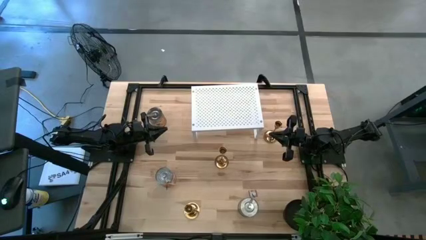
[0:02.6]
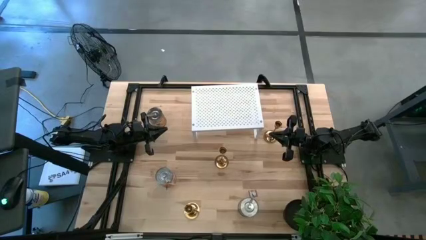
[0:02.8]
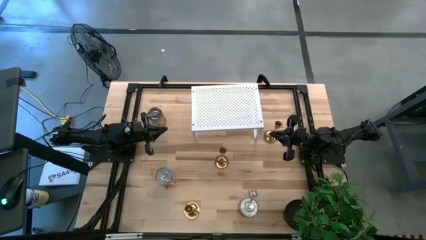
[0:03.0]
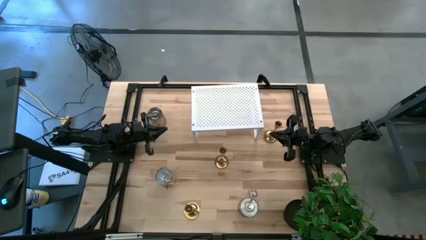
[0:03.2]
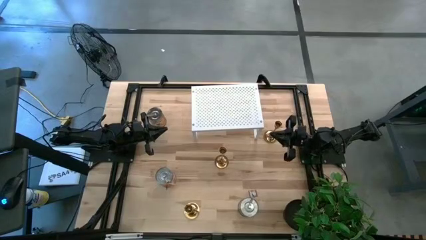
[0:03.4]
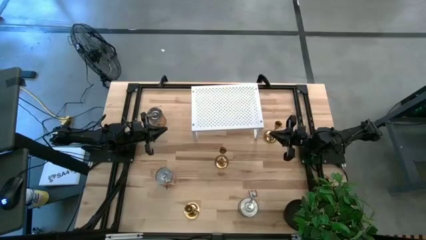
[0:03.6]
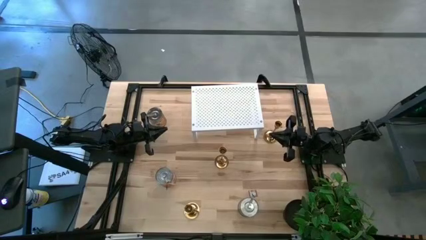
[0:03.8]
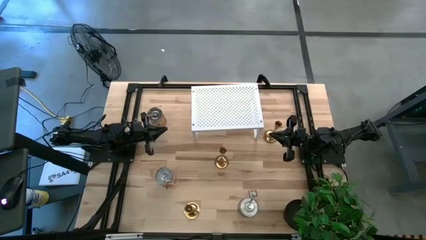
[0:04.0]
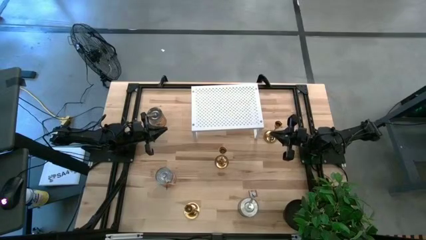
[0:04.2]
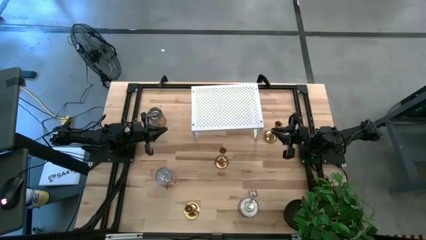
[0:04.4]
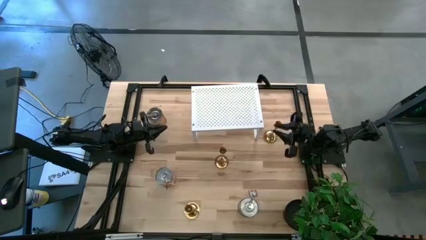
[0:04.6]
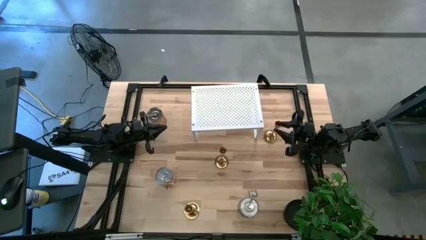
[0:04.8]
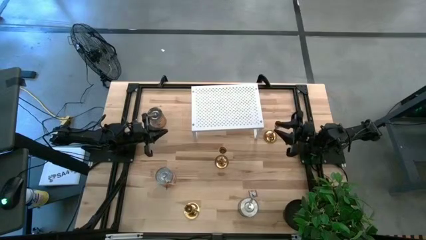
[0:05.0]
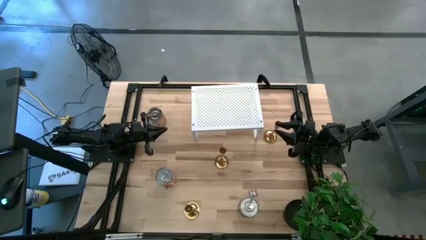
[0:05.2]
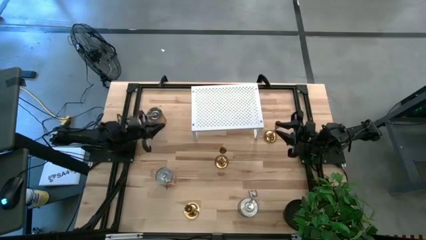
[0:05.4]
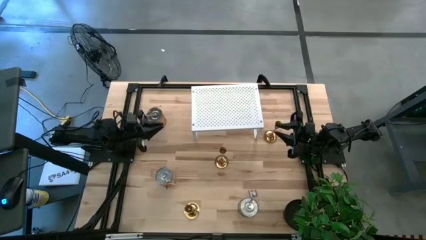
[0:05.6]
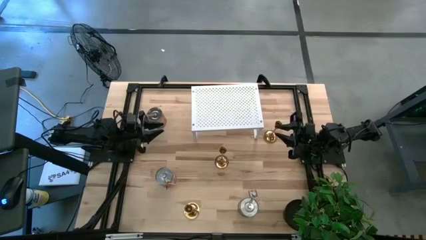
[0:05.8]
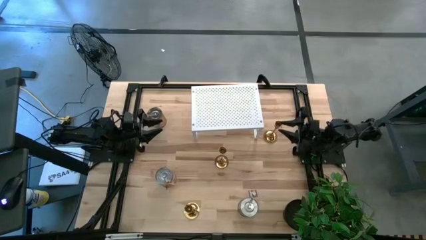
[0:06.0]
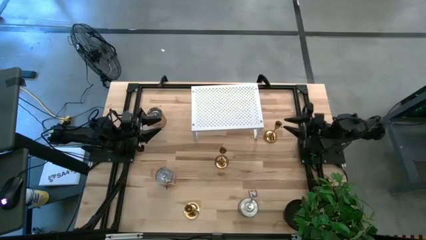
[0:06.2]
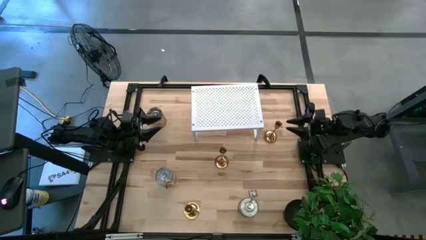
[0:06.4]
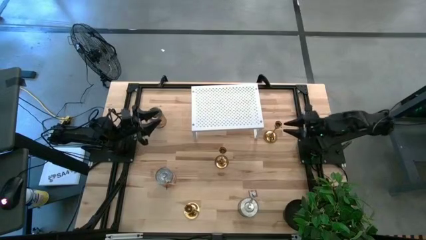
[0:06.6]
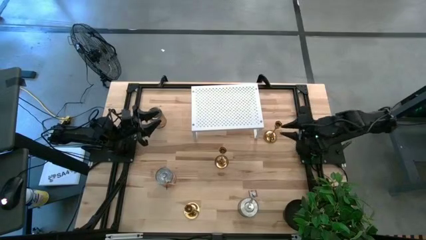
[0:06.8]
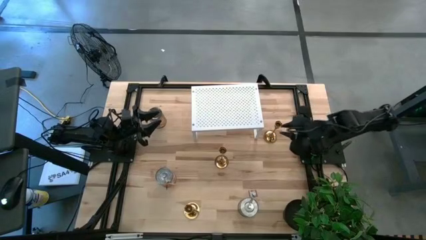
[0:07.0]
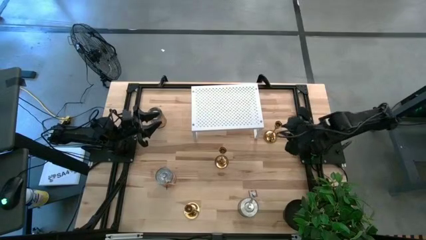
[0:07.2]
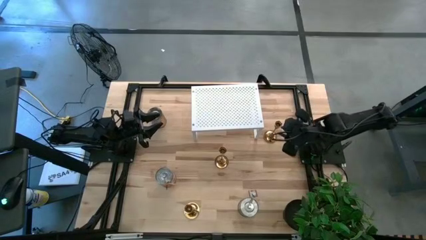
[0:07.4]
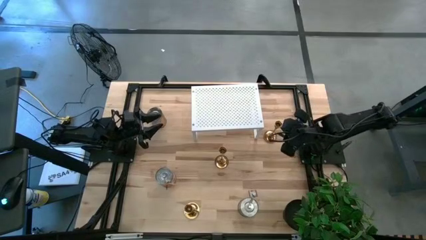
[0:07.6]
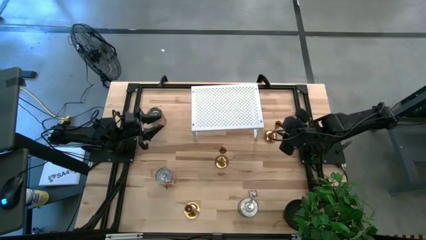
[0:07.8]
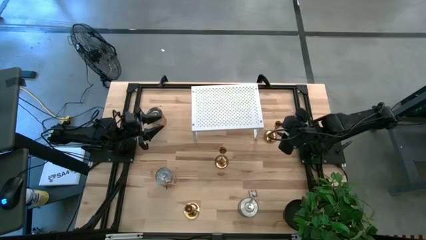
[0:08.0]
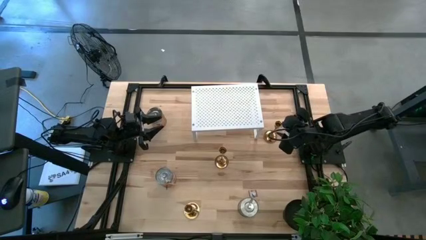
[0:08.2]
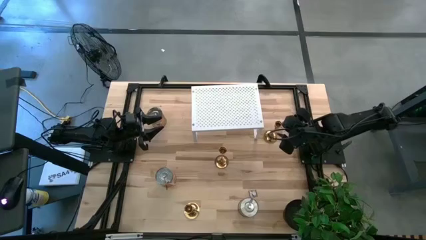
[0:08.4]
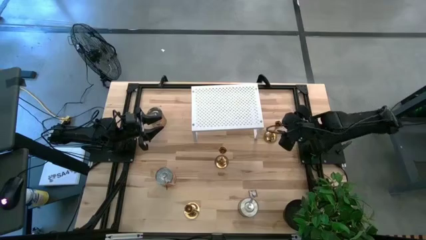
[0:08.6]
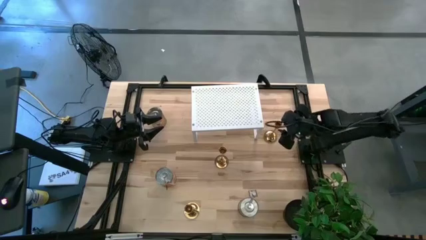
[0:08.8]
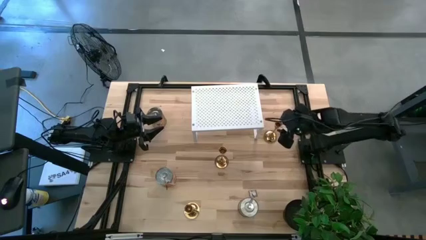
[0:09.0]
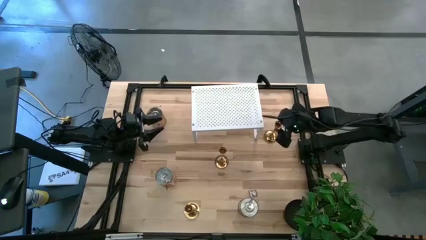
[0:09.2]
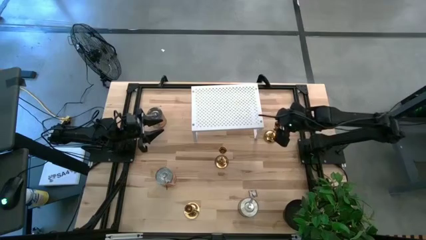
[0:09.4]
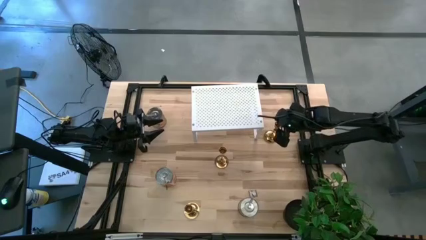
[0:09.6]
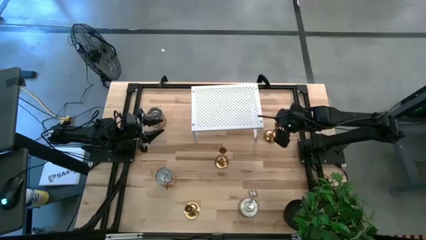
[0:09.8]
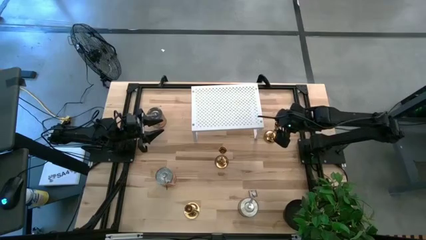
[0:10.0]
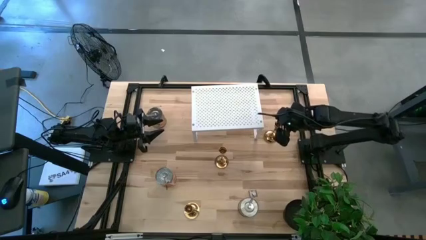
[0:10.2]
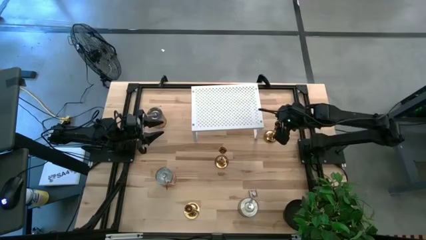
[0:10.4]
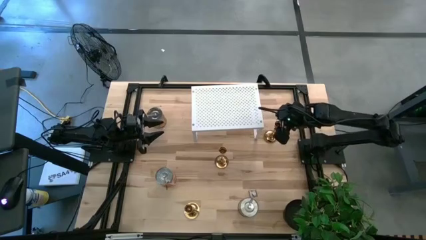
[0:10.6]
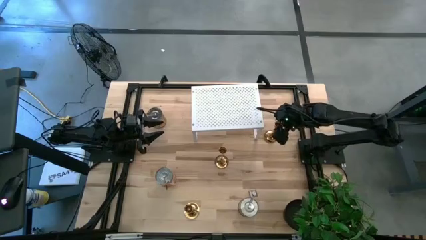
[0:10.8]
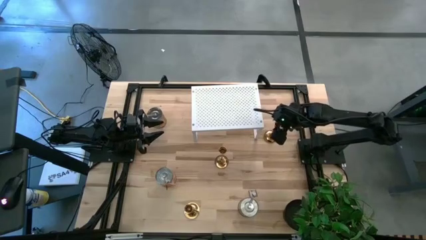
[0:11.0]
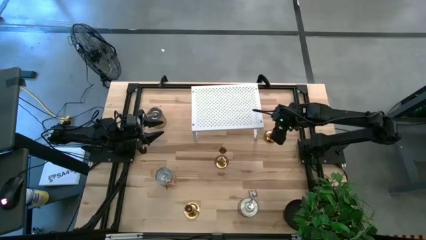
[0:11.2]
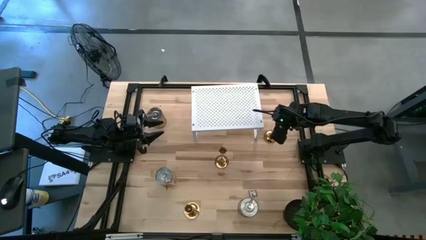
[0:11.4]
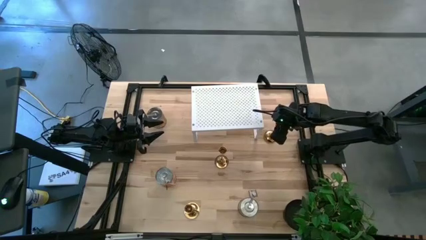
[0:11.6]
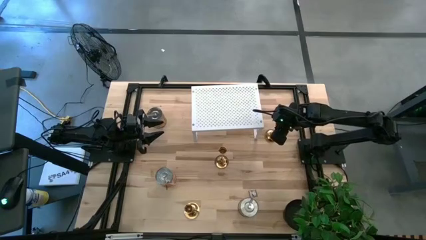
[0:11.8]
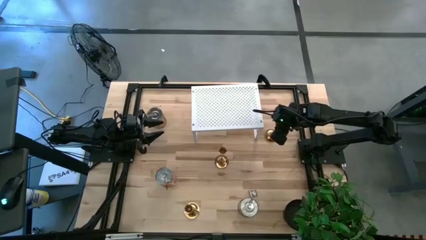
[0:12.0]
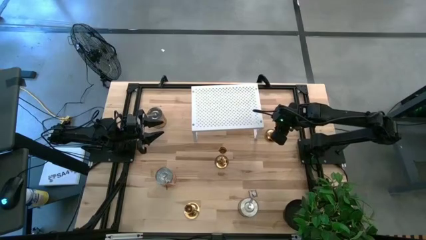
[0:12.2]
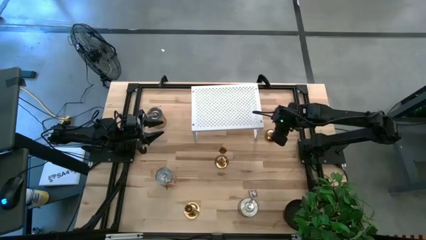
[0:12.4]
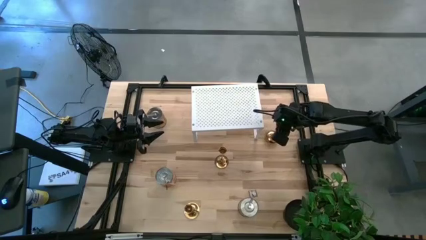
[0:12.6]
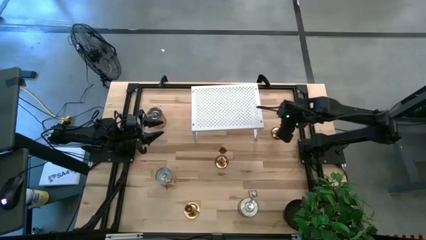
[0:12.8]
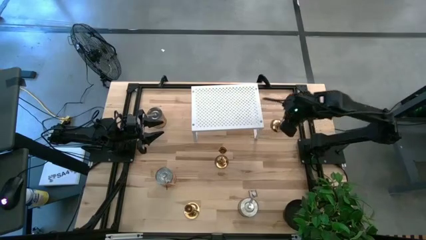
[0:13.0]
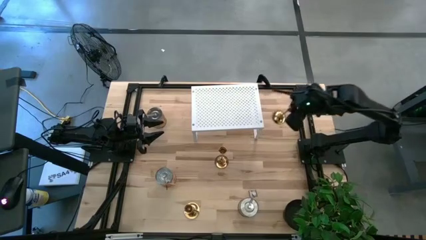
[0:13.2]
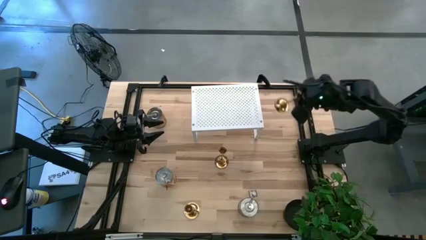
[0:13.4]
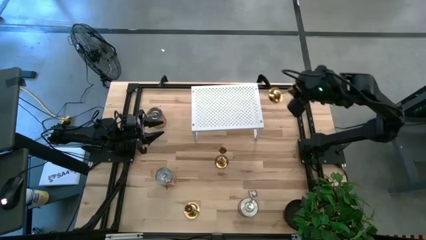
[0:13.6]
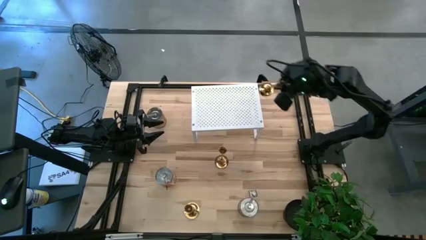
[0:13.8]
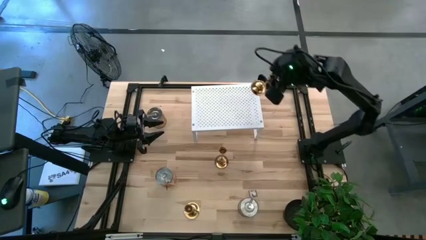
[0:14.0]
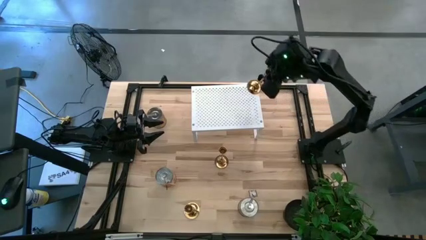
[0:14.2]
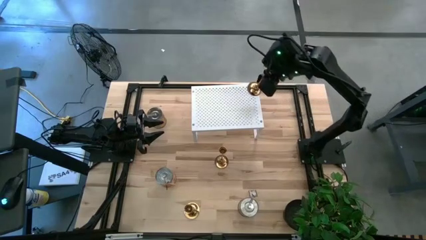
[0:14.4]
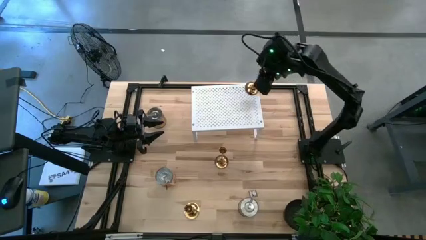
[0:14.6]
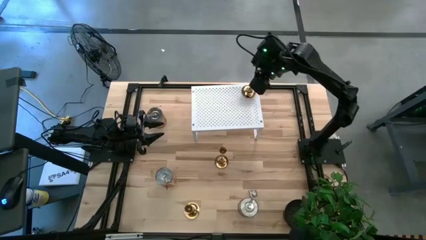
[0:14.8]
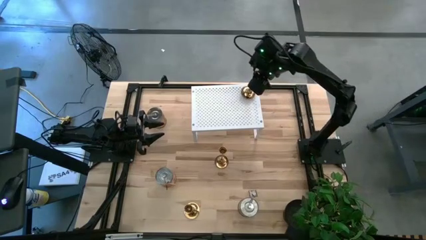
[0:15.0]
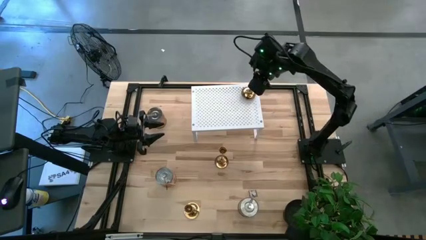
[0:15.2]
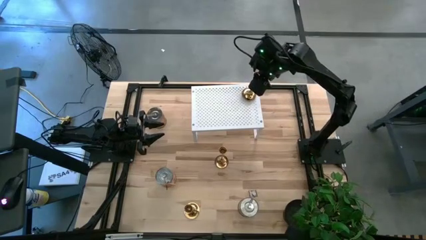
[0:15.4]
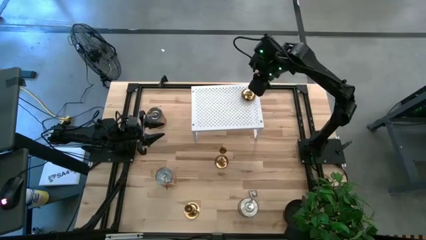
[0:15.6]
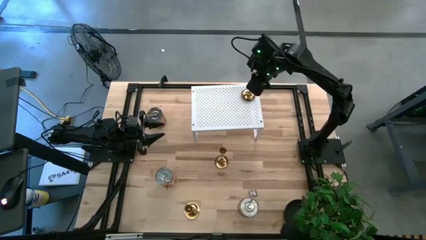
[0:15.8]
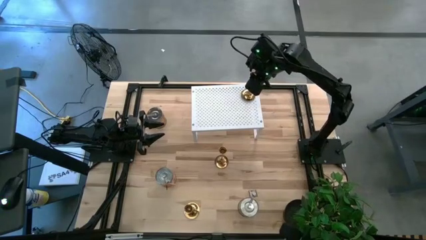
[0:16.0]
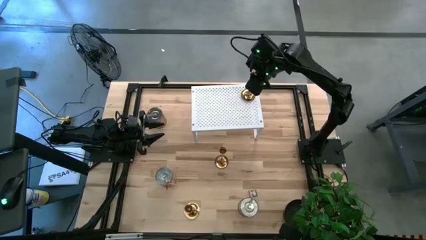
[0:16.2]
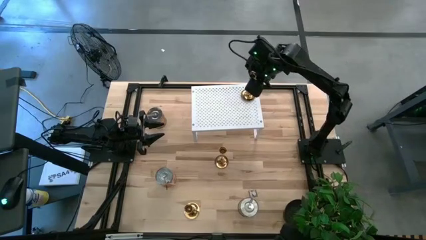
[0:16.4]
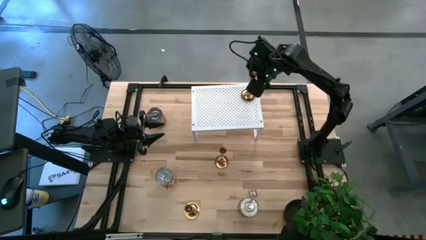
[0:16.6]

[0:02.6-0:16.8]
Task: Pick & Place candle stick holders
Put the right gold candle holder on the shelf
